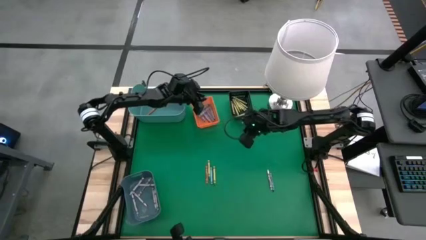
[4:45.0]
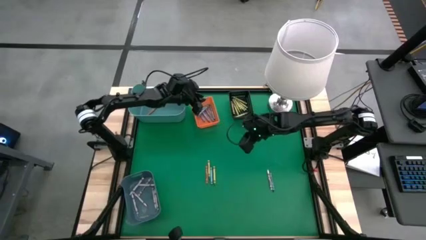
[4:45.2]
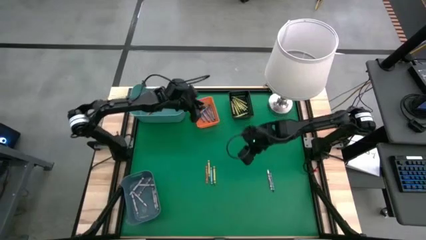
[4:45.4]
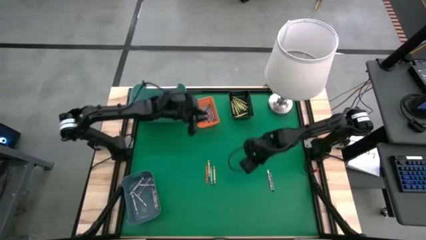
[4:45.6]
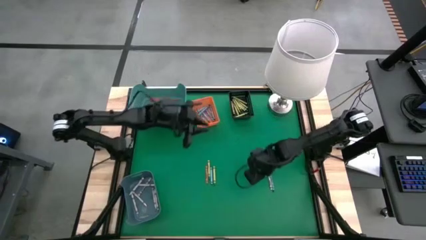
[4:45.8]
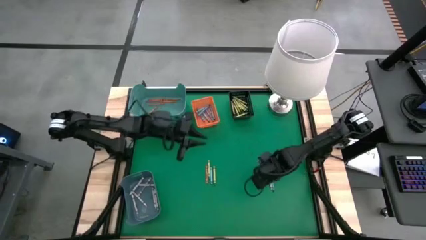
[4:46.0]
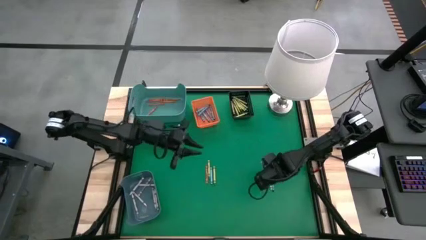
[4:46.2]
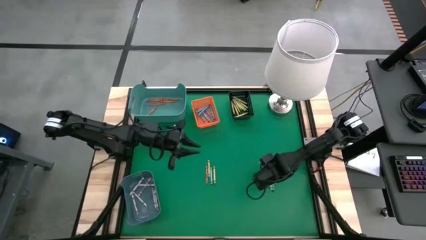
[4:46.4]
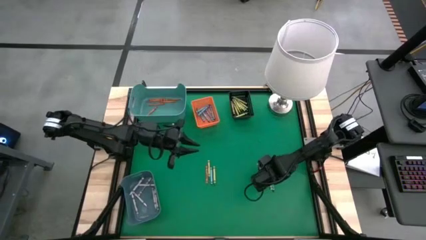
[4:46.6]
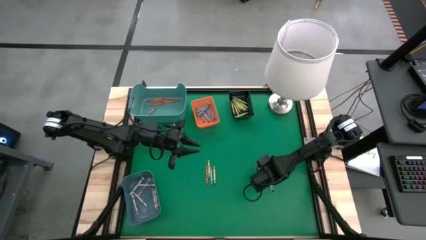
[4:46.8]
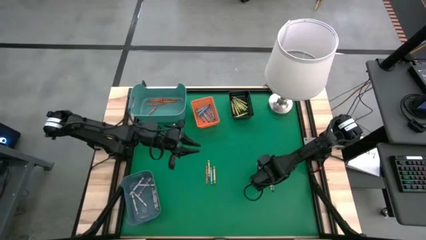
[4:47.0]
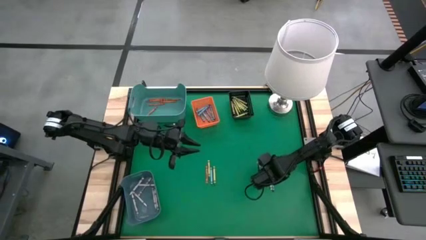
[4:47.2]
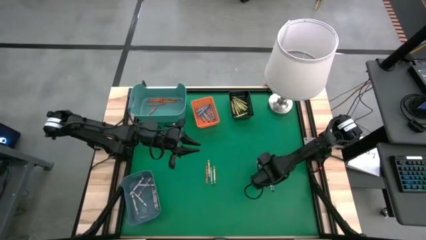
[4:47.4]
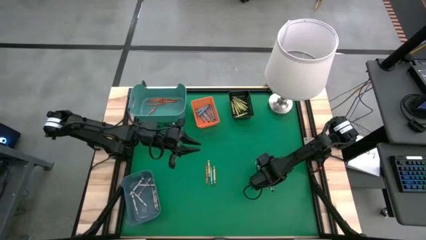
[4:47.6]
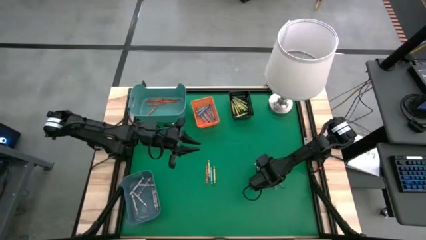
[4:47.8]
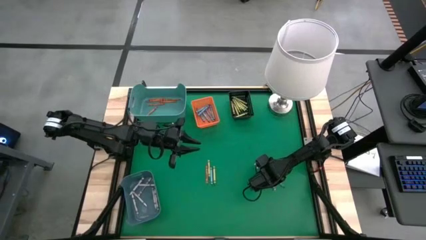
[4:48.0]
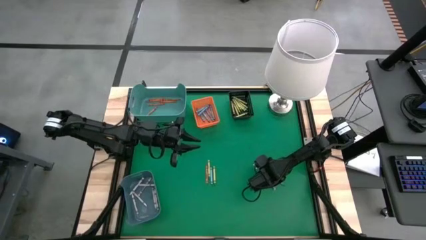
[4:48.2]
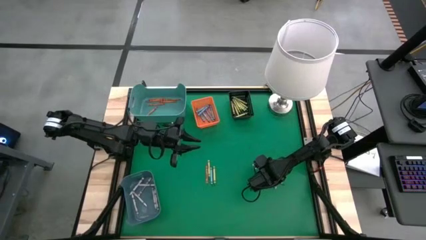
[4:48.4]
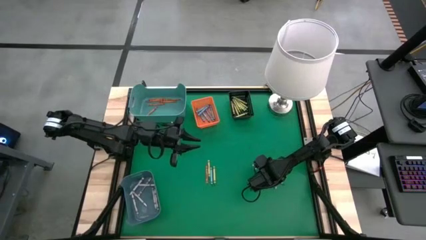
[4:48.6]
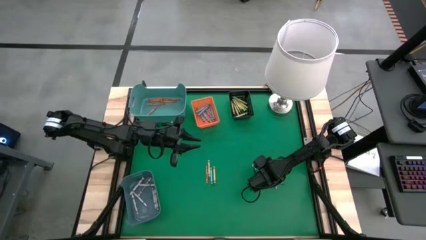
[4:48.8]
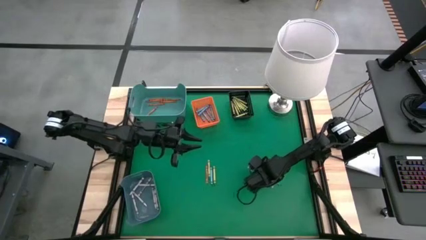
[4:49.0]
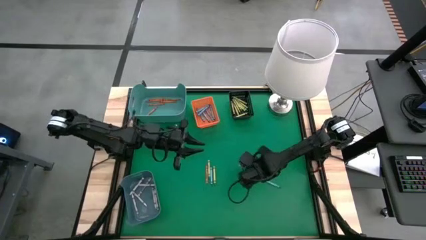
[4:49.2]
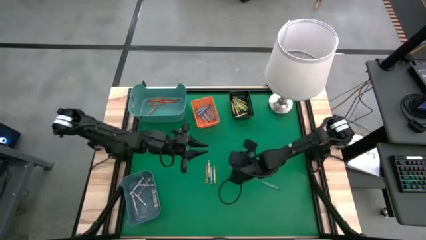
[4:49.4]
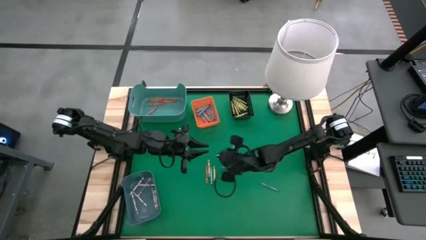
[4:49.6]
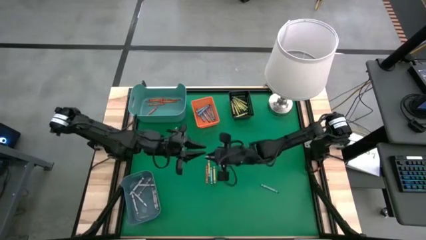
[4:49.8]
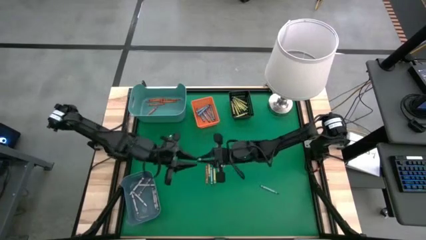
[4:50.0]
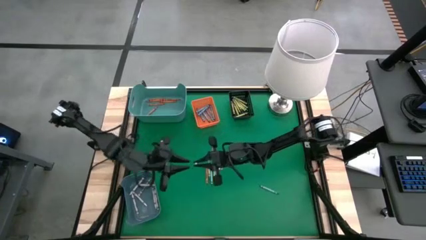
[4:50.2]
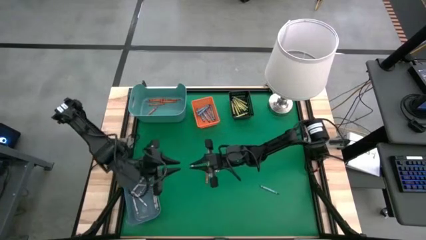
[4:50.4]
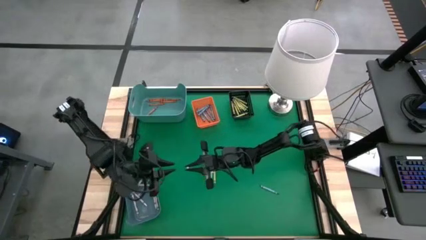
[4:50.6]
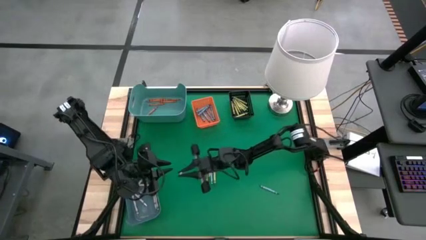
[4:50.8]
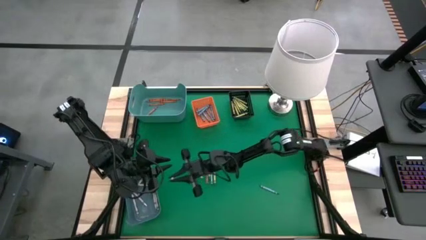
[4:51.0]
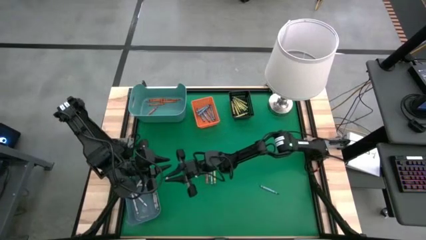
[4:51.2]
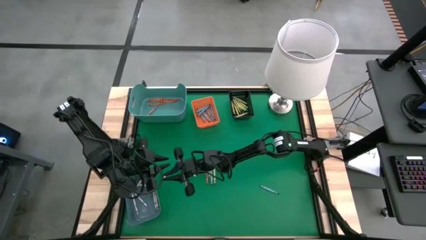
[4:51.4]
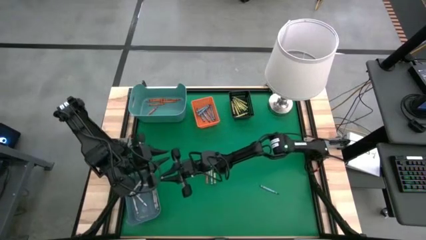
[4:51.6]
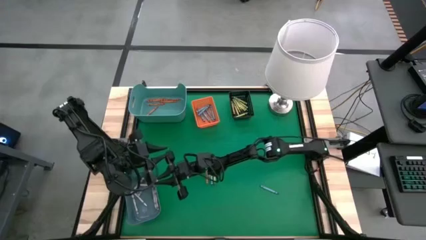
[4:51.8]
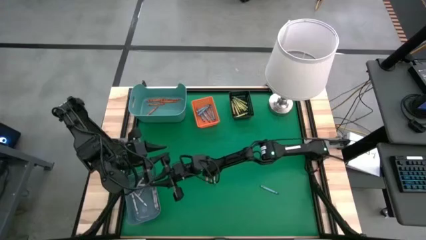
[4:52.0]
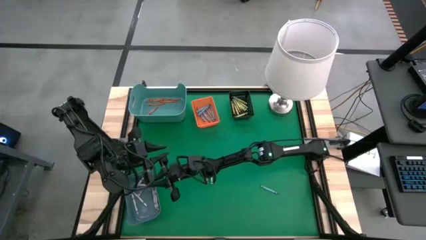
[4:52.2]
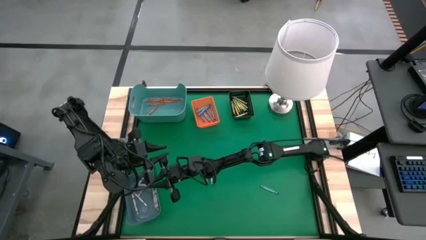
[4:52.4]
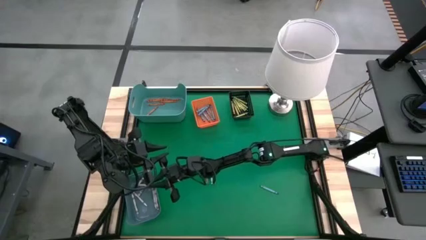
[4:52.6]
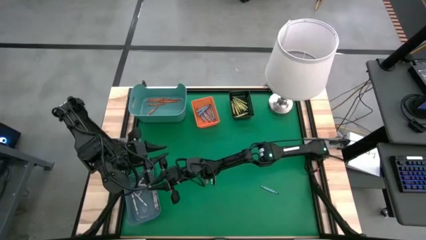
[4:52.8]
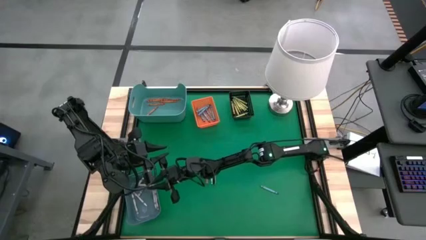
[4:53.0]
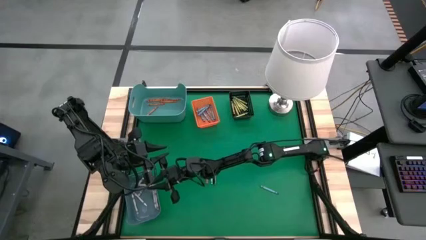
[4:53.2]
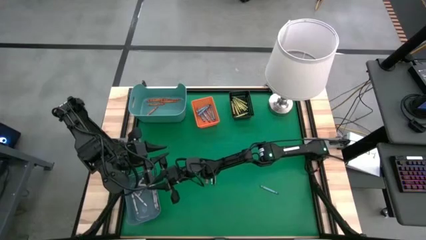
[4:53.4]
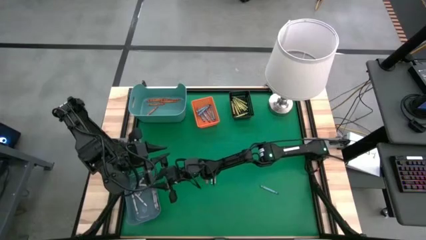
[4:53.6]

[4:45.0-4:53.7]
Task: Sort crayons
Put the white crayon into the blue bin

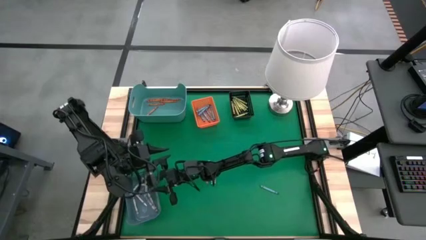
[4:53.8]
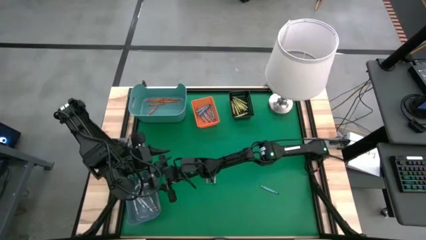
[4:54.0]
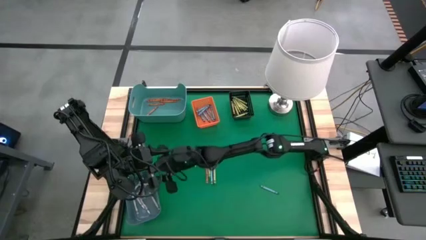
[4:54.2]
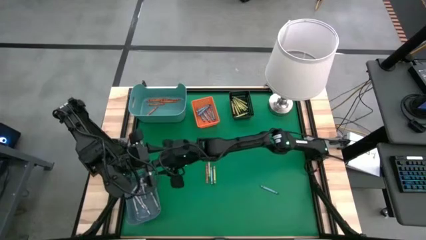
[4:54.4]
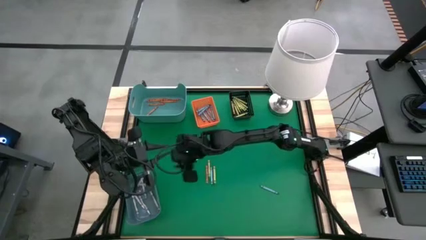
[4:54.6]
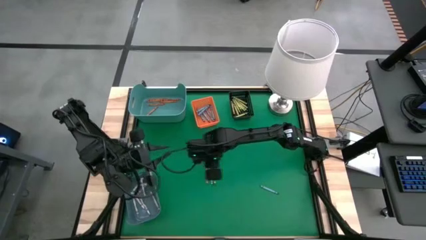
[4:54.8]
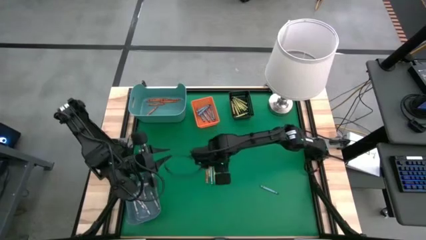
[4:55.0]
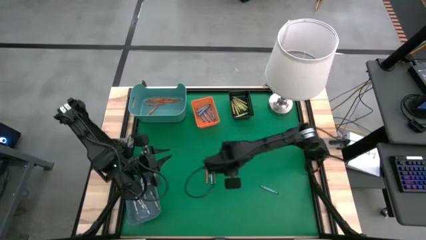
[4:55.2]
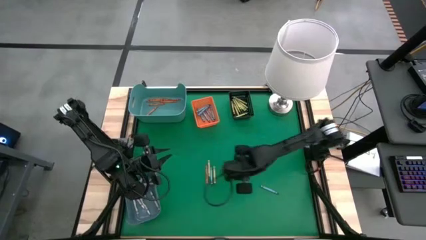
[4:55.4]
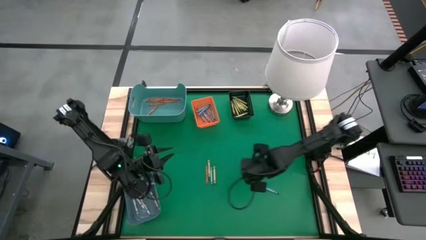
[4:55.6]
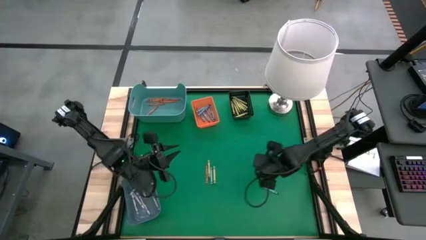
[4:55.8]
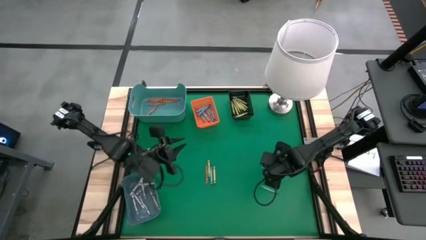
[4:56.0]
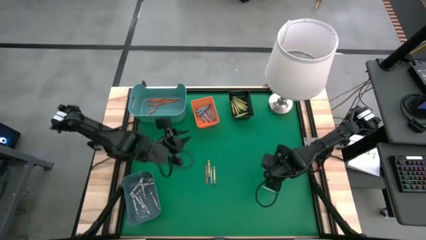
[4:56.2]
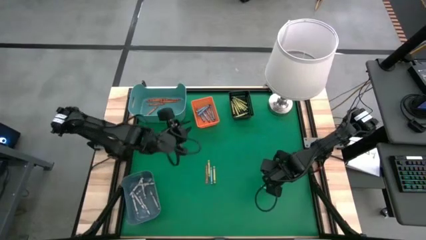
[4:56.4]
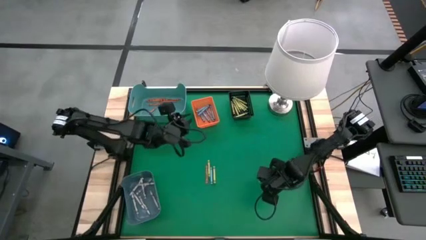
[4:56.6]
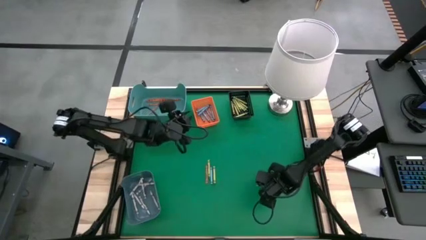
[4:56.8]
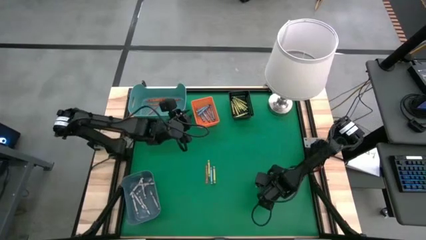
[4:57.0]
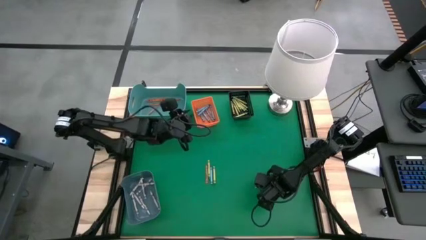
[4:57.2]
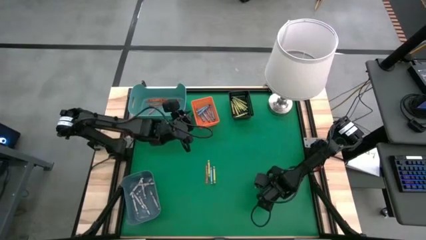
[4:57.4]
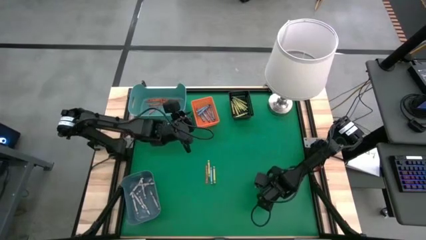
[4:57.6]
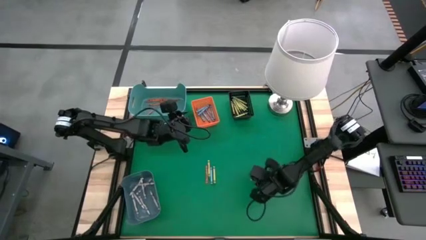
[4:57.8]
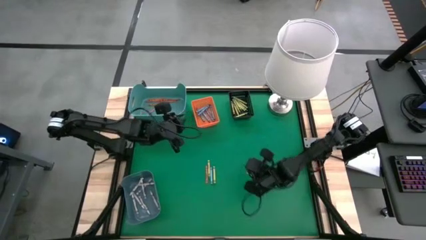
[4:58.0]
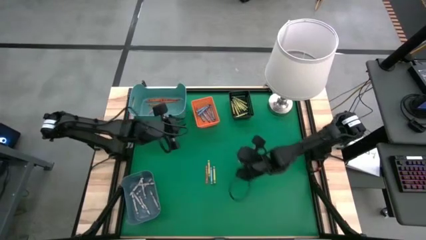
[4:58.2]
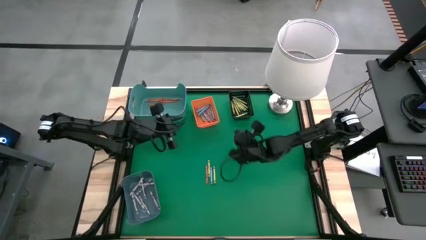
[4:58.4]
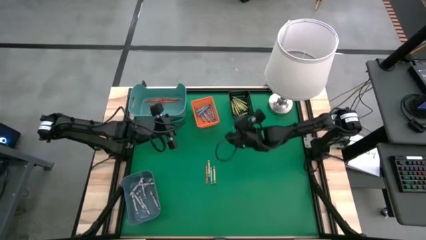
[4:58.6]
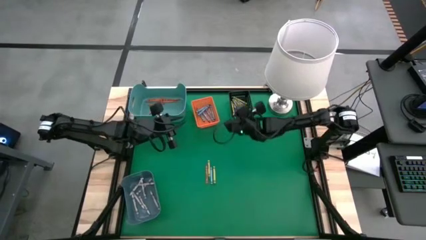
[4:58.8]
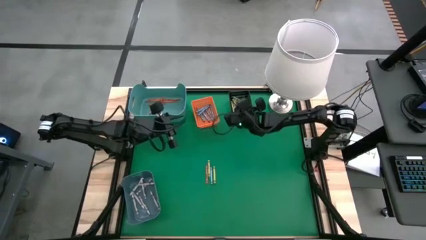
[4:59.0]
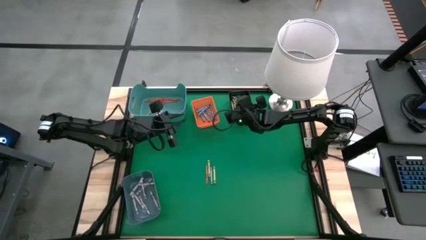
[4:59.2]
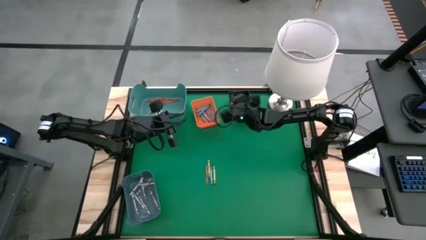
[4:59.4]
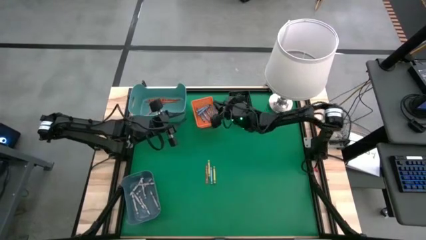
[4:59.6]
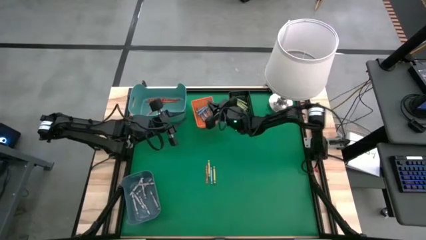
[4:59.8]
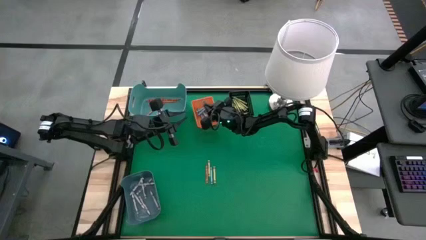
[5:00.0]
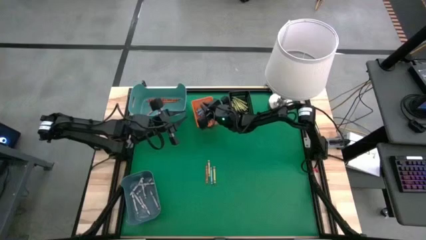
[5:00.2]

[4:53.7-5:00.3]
Put the blue crayon into the orange bin
